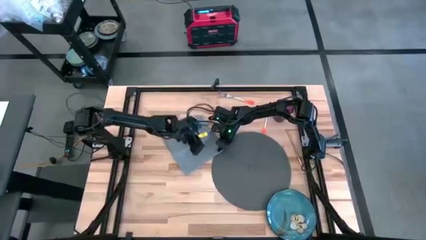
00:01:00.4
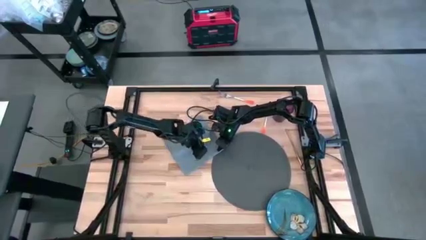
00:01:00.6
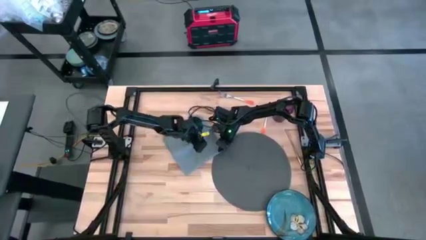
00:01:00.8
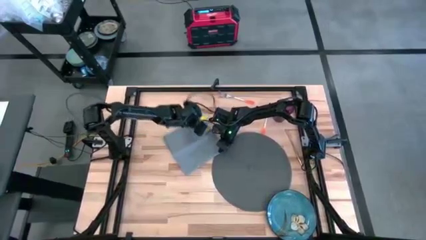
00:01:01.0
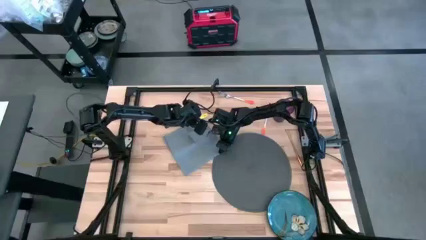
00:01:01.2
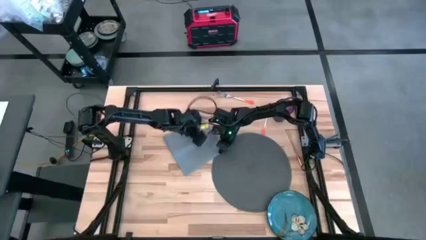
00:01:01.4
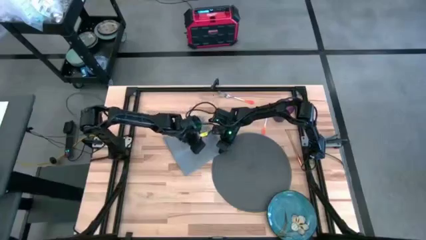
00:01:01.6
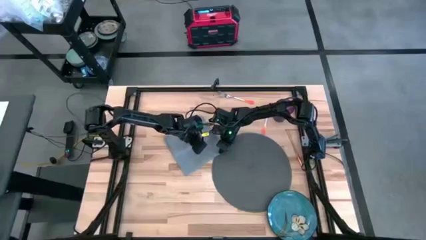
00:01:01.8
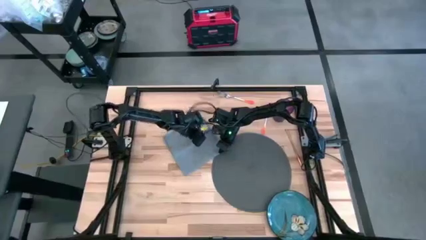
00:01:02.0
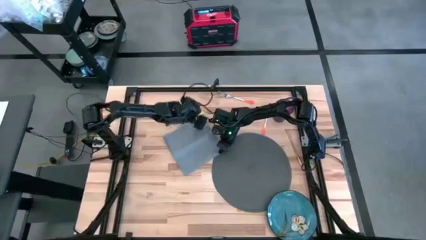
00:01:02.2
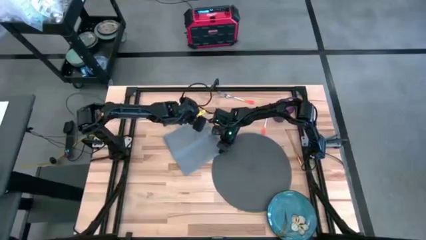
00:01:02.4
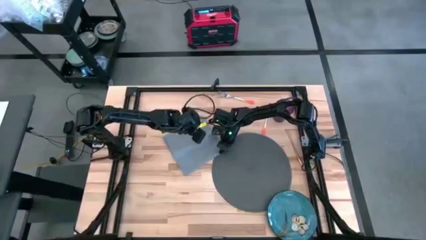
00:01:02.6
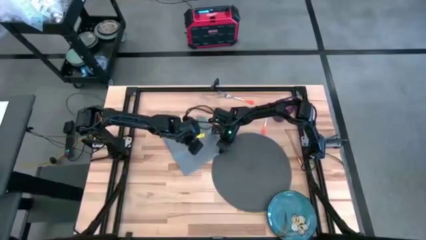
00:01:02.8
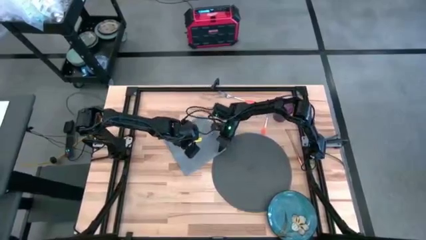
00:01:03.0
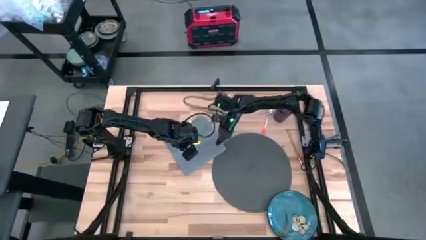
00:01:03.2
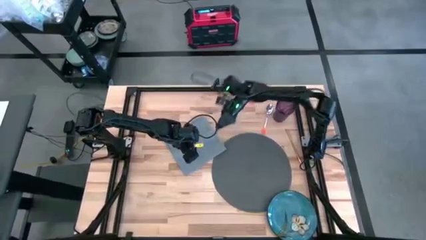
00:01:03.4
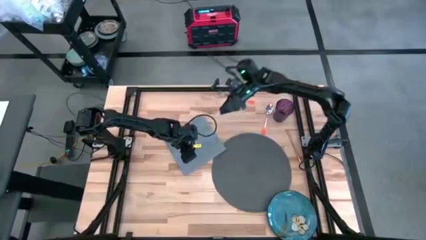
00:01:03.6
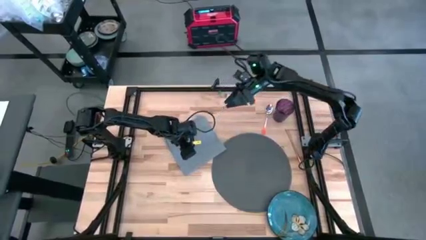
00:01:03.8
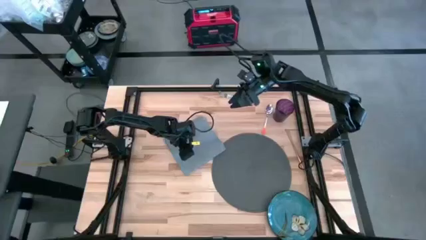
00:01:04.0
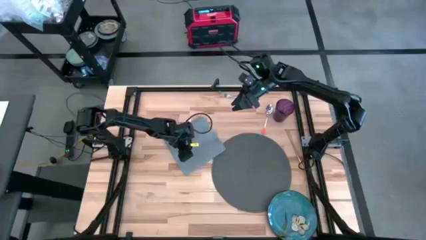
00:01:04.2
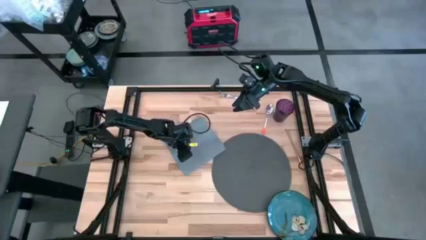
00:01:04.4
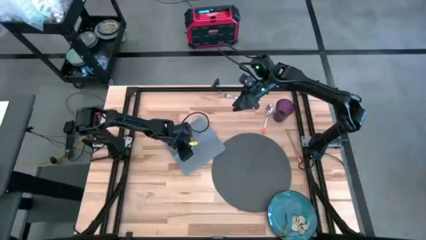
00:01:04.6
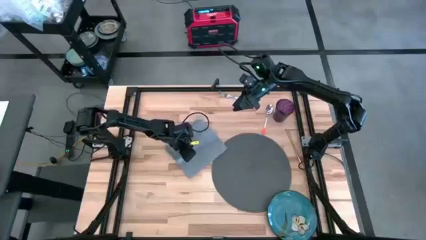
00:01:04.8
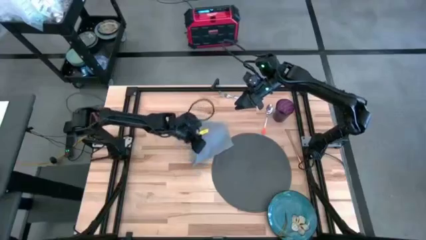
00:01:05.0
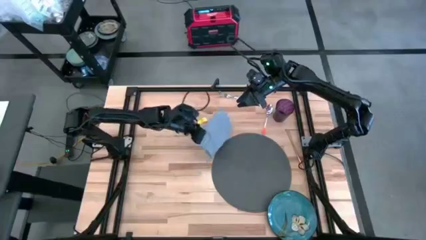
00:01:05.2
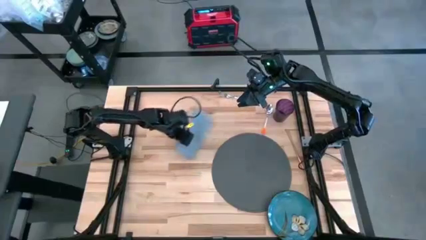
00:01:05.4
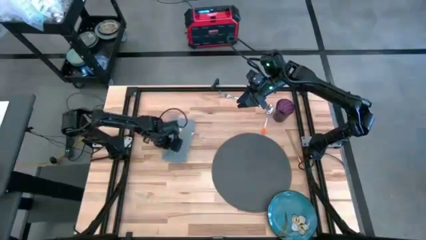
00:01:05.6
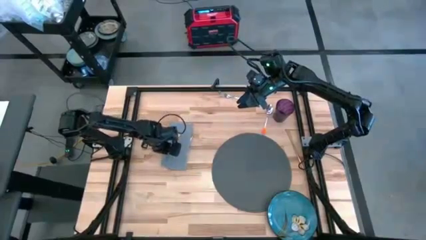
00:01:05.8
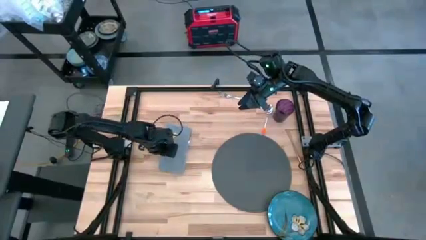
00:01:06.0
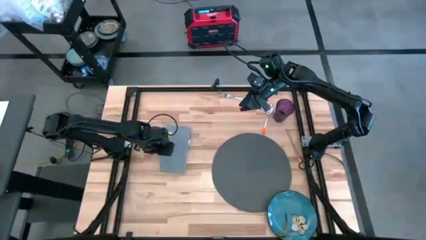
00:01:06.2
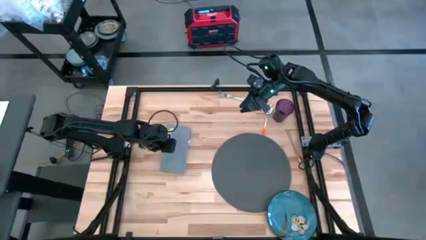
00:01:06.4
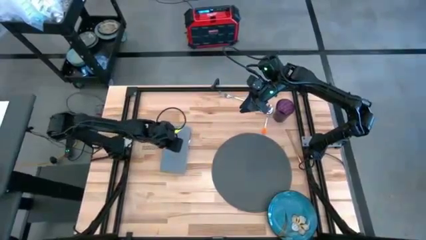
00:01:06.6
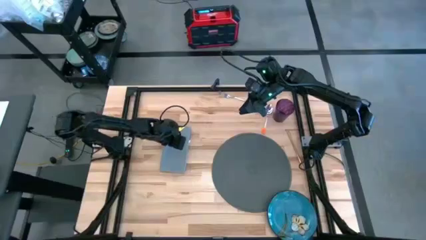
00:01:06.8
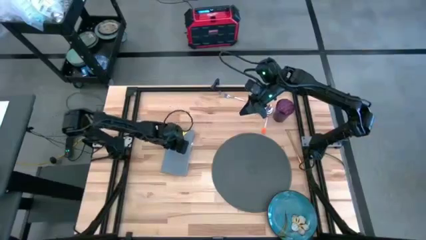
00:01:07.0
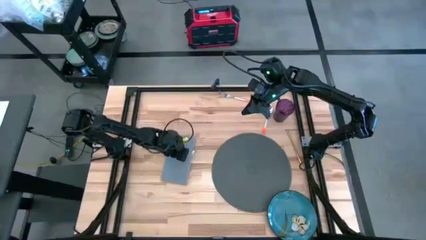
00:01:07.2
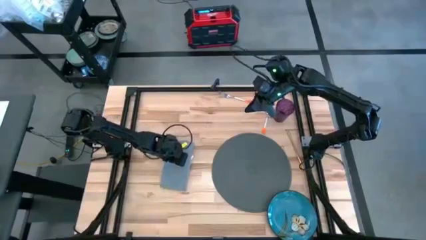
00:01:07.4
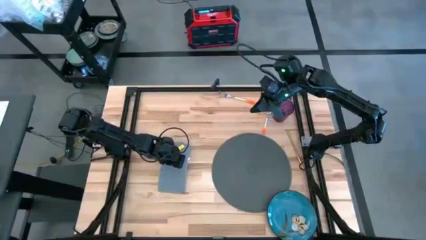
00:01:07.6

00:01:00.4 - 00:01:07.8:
Task: Set table place
Fold the light gray table napkin on the table

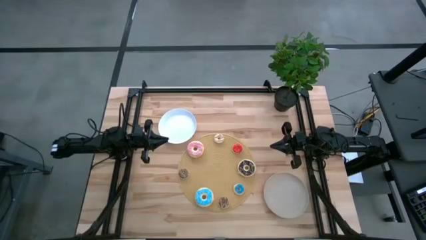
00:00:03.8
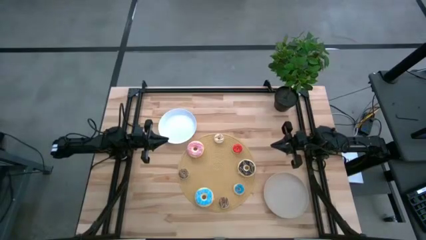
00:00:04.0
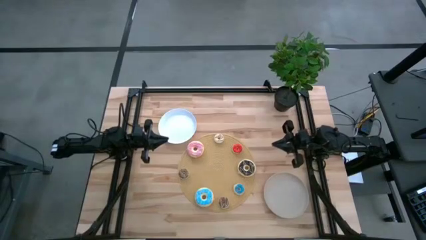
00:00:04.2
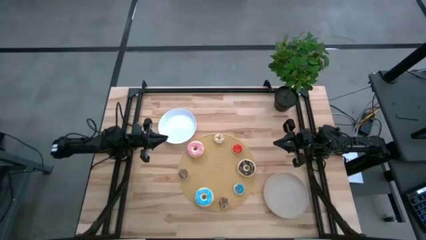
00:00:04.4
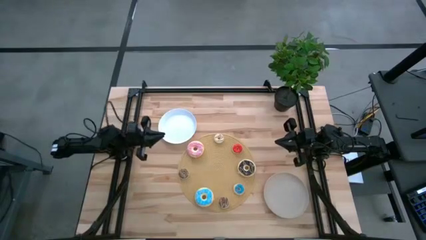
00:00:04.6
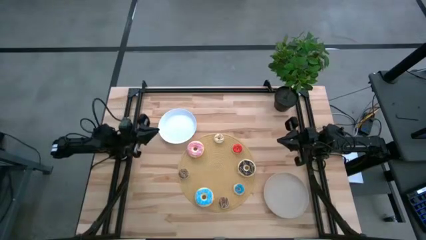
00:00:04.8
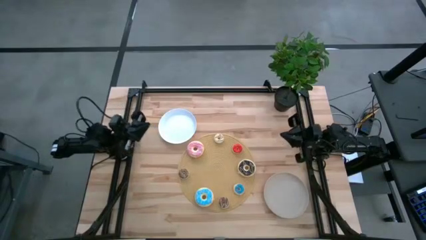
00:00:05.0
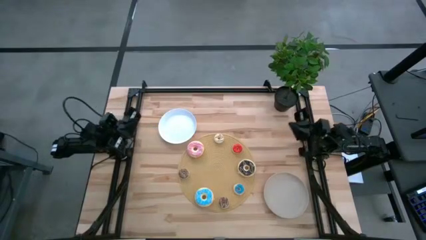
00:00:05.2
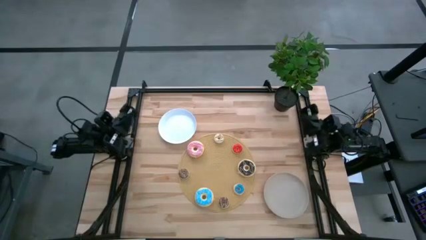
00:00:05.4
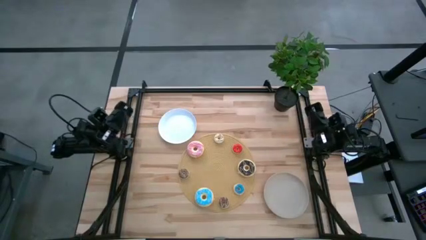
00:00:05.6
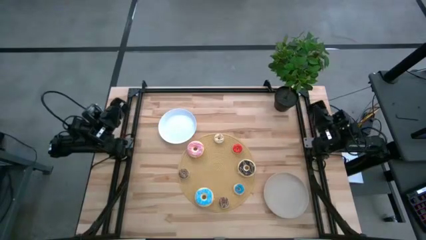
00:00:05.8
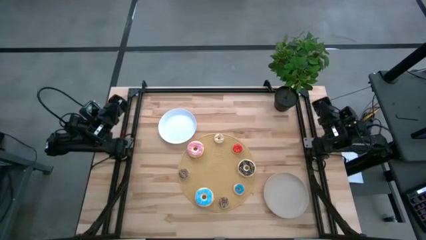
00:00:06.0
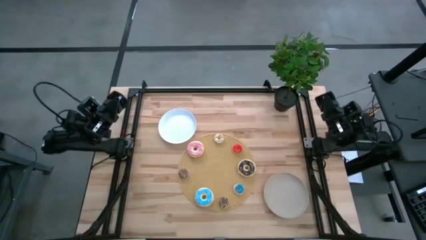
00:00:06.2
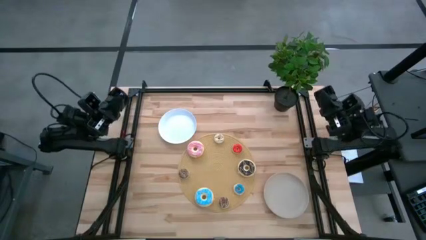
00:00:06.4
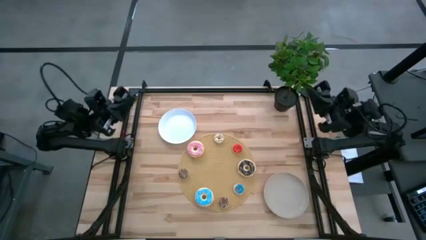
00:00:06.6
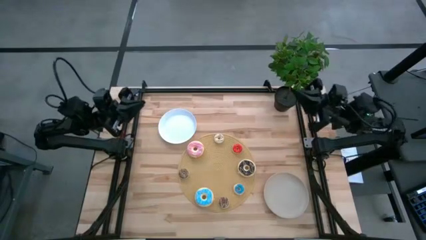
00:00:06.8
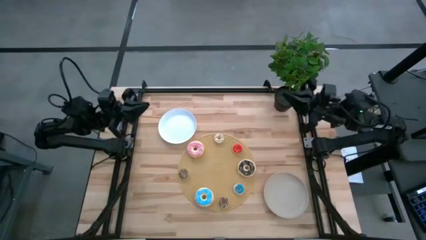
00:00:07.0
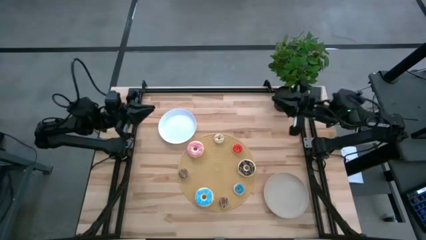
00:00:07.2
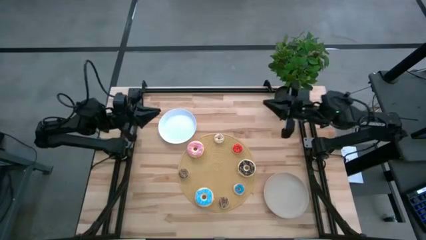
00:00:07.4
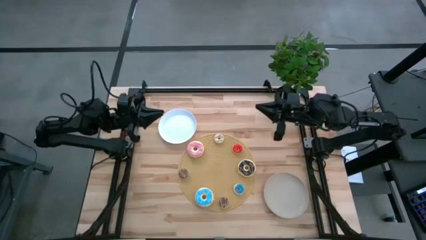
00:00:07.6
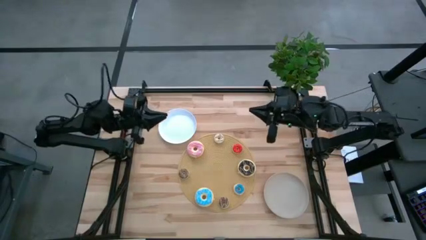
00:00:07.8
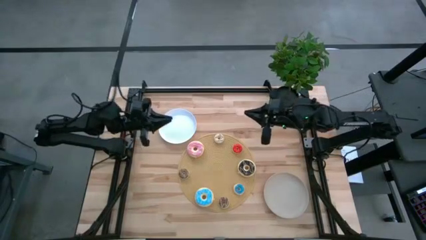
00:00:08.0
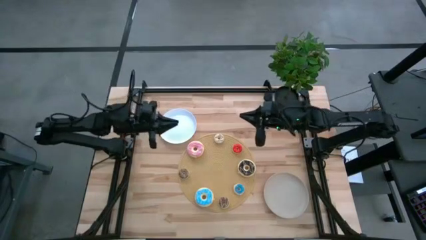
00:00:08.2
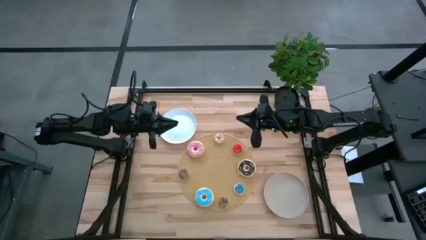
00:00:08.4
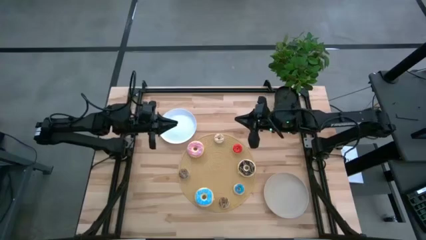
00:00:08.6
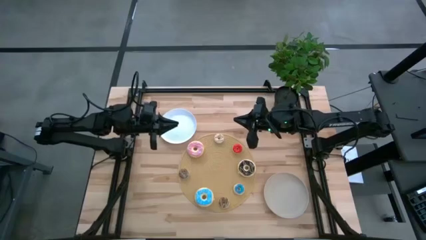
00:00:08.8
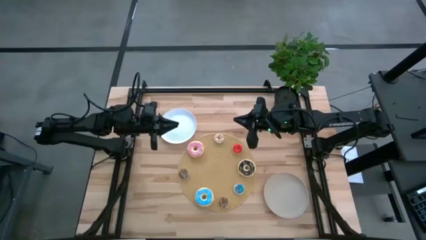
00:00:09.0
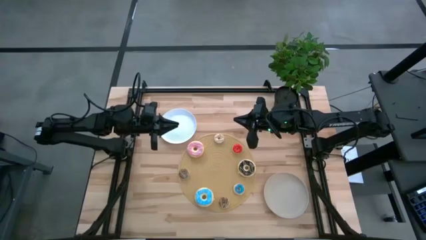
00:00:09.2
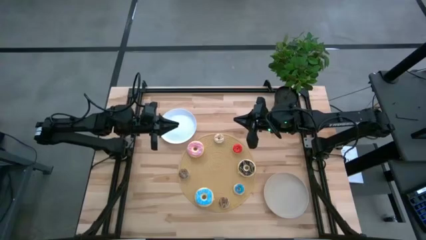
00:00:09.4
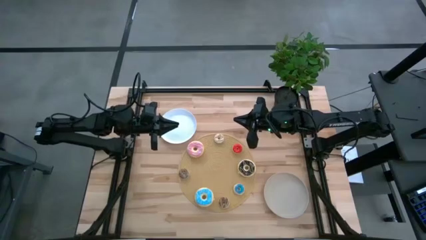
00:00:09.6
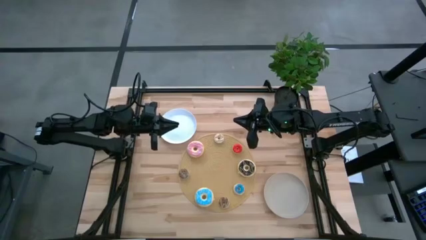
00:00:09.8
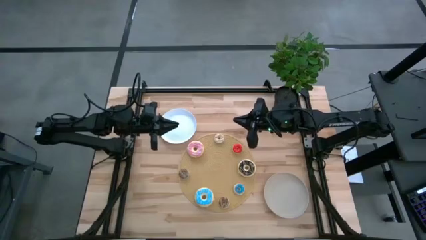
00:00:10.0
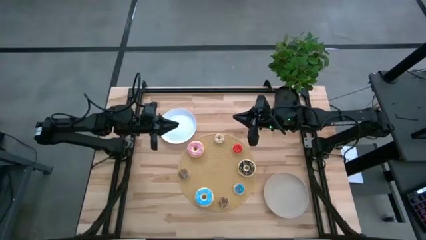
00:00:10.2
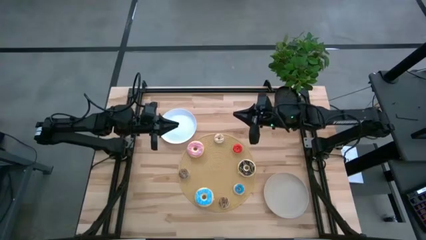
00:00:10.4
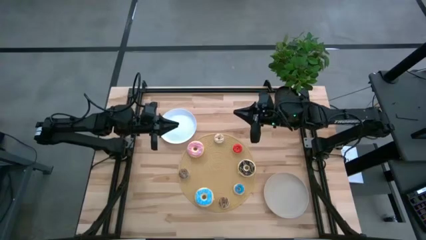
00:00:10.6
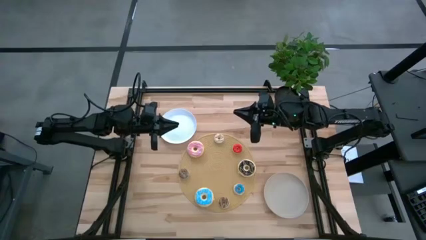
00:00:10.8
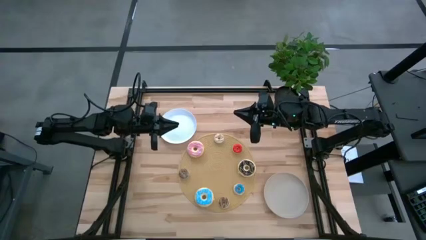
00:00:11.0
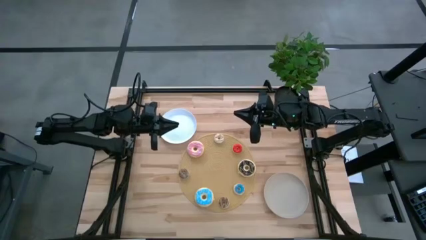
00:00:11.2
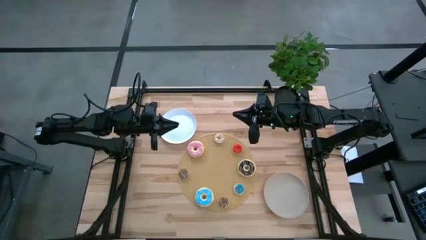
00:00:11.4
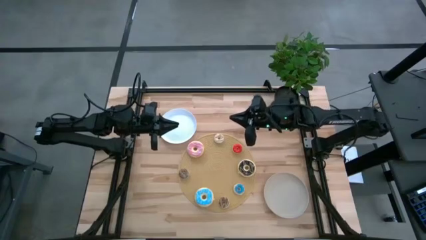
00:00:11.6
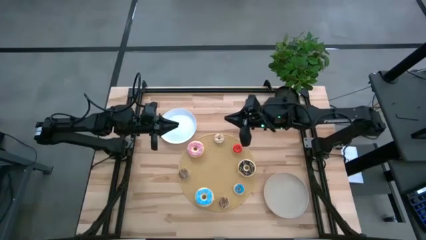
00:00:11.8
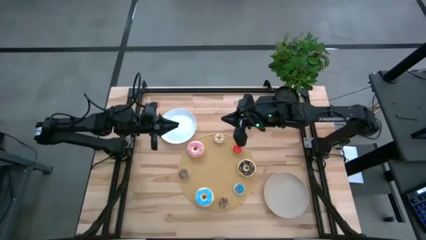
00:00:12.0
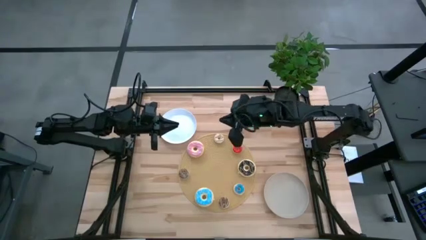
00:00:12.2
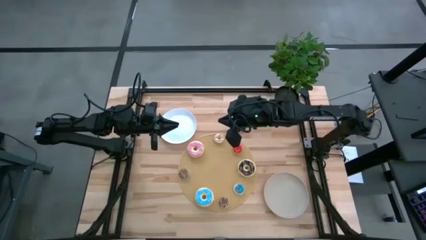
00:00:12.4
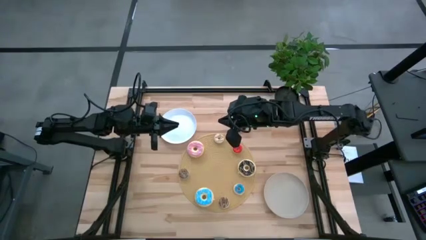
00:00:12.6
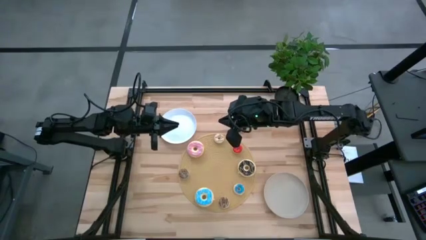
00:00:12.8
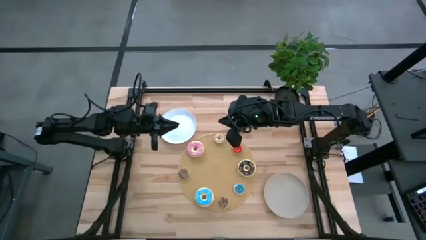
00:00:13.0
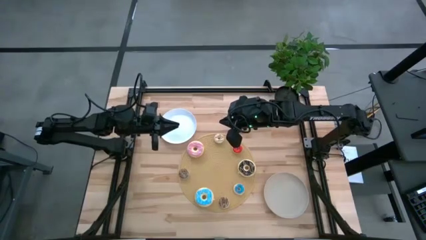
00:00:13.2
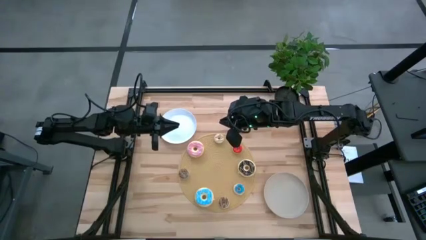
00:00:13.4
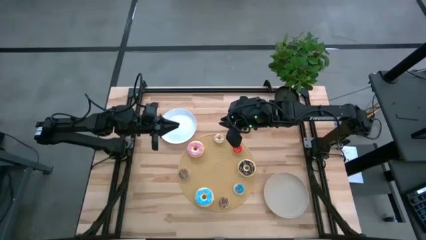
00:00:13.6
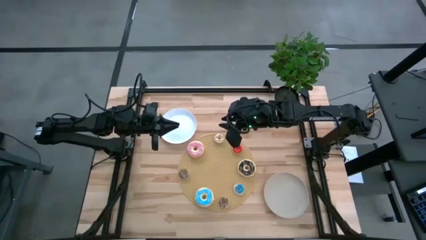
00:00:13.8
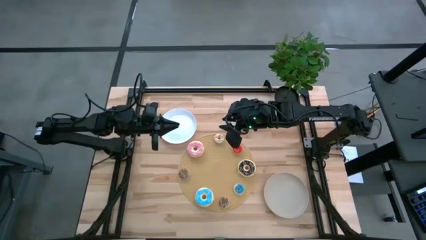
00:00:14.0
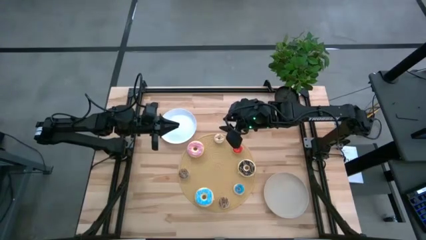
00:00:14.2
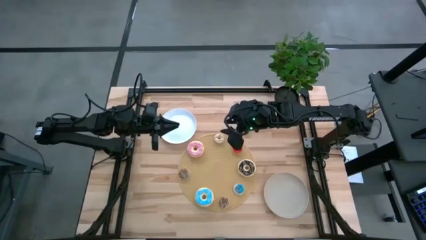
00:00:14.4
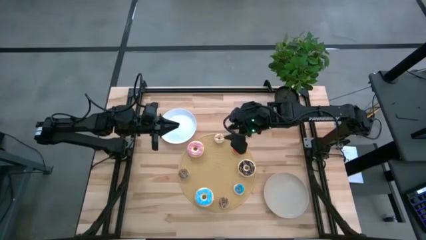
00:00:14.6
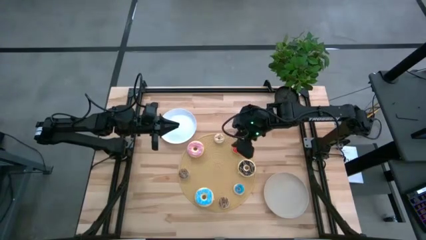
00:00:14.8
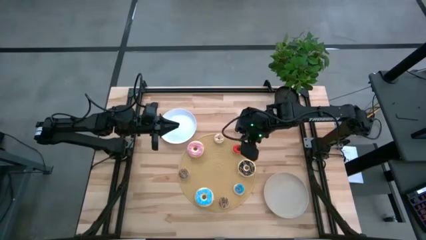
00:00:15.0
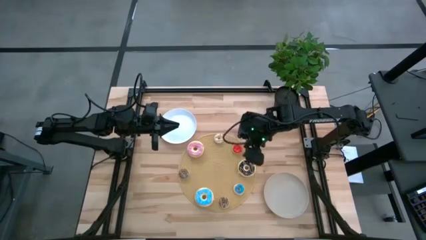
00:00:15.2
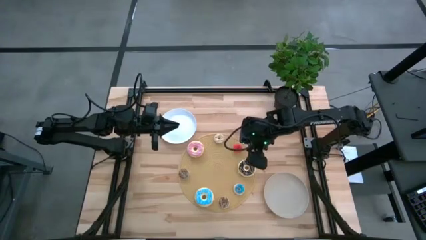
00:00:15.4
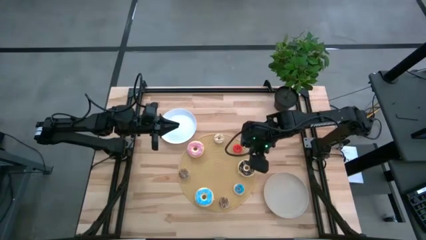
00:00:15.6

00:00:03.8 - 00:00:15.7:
Task: Pick & Place donuts
Put the large black donut into the gray plate
